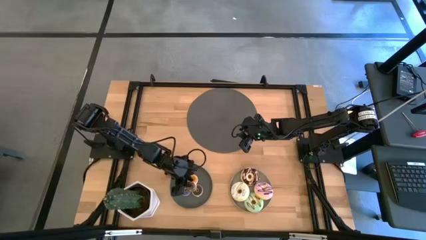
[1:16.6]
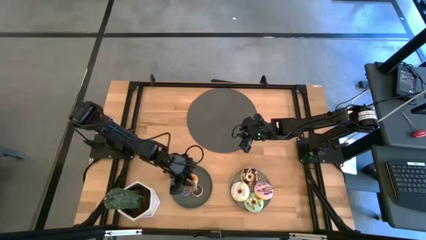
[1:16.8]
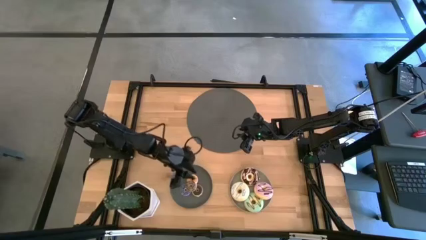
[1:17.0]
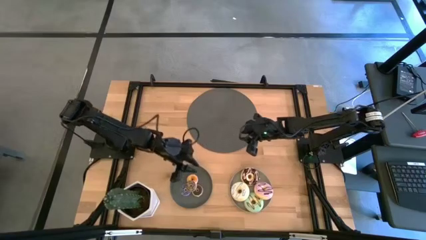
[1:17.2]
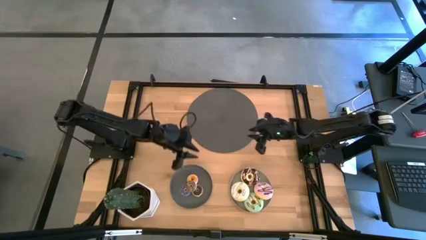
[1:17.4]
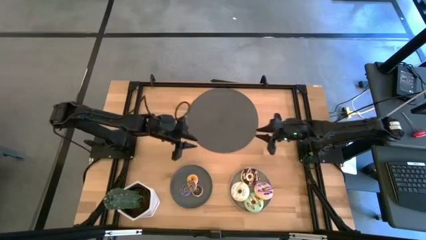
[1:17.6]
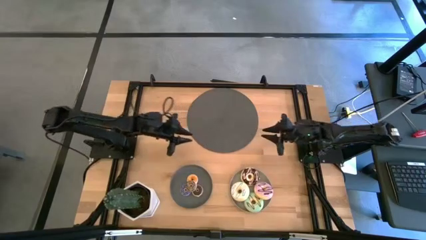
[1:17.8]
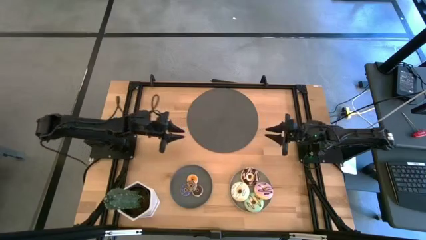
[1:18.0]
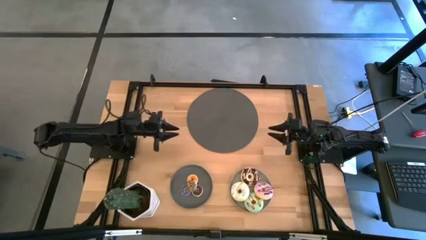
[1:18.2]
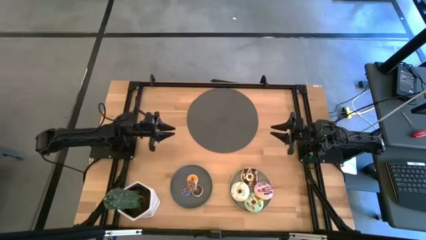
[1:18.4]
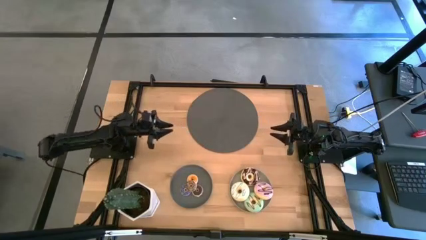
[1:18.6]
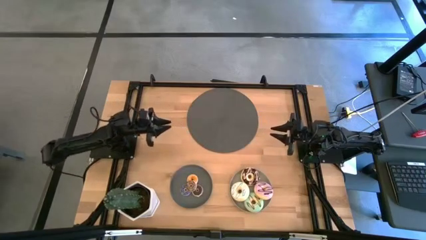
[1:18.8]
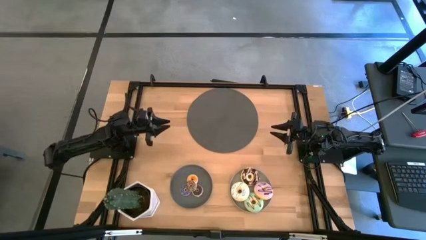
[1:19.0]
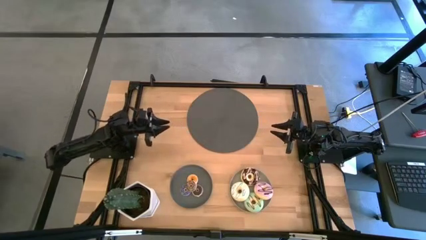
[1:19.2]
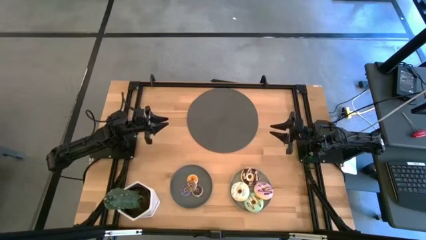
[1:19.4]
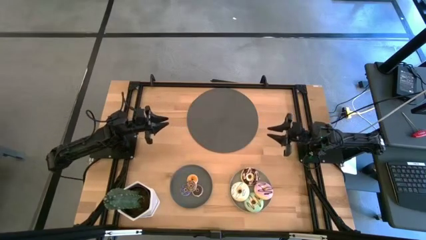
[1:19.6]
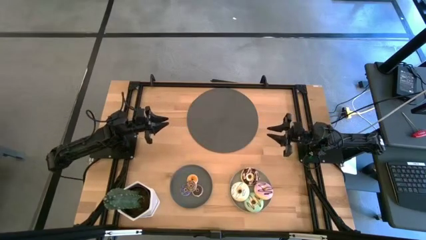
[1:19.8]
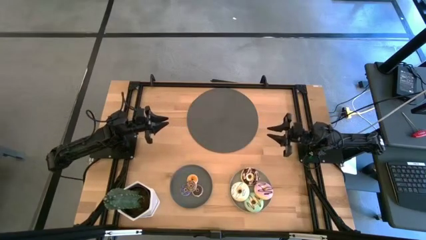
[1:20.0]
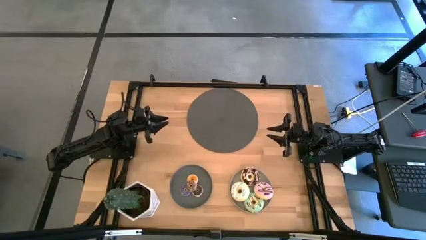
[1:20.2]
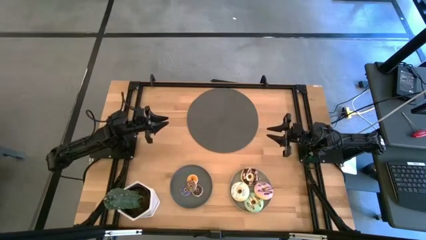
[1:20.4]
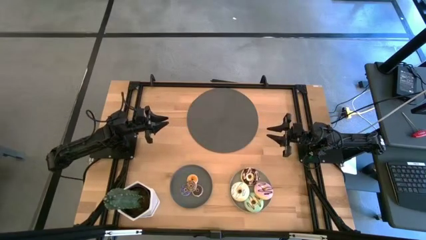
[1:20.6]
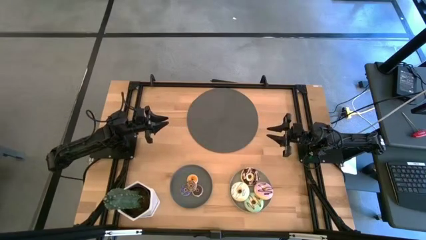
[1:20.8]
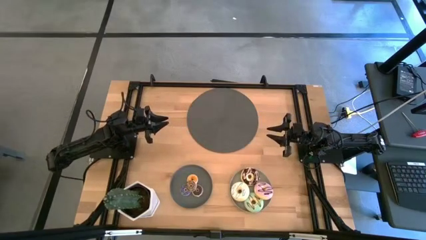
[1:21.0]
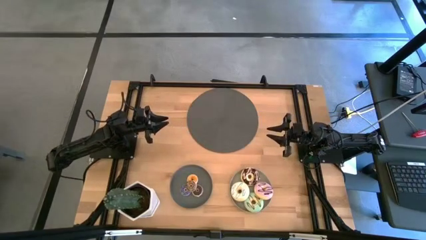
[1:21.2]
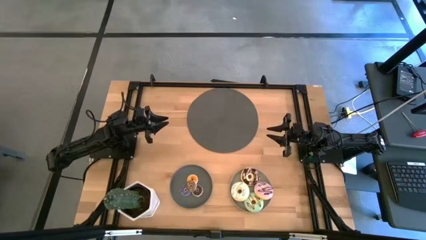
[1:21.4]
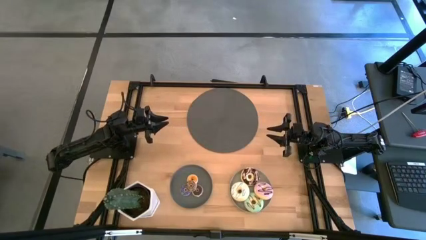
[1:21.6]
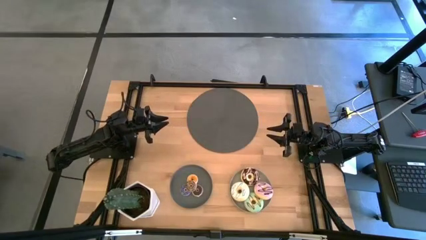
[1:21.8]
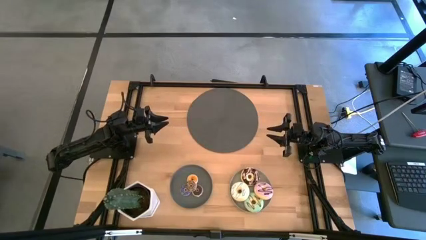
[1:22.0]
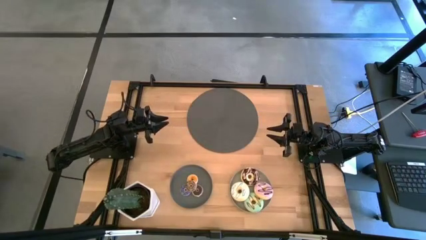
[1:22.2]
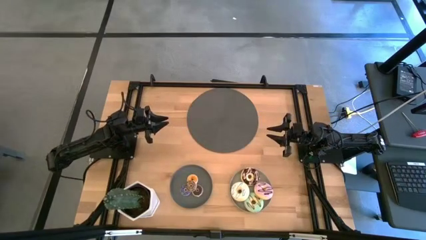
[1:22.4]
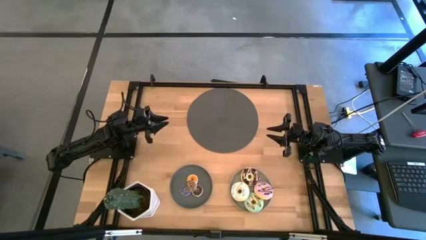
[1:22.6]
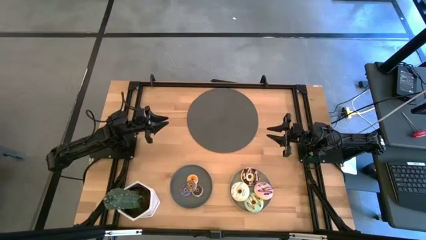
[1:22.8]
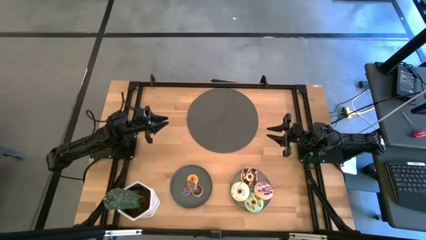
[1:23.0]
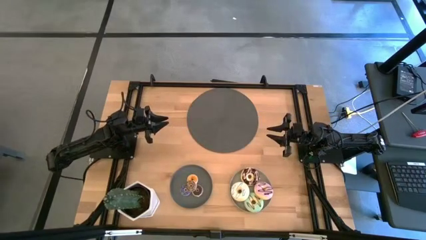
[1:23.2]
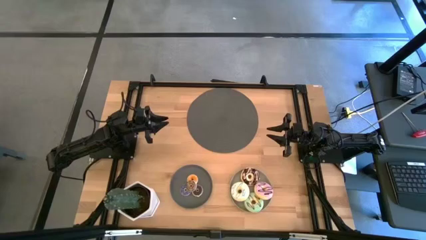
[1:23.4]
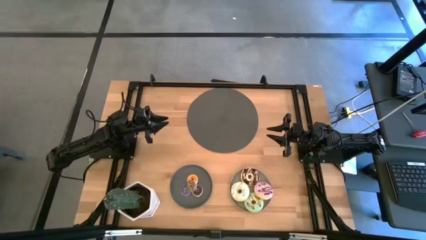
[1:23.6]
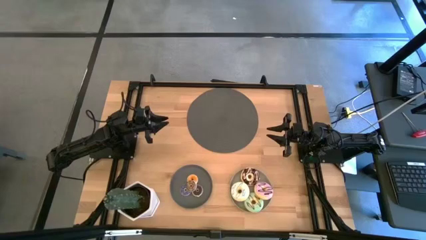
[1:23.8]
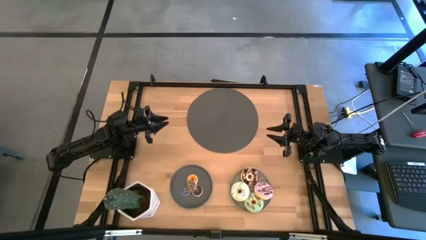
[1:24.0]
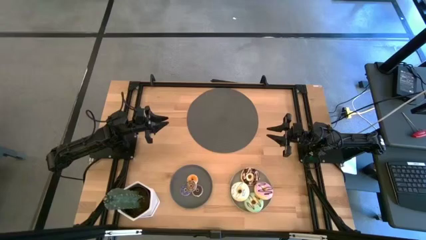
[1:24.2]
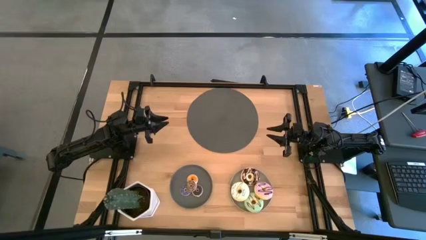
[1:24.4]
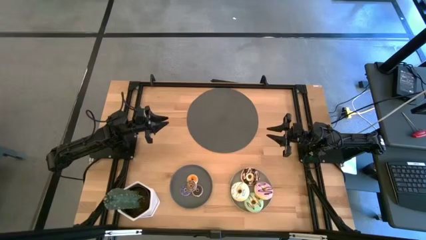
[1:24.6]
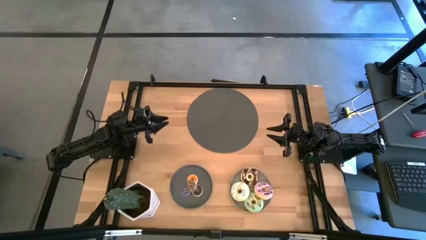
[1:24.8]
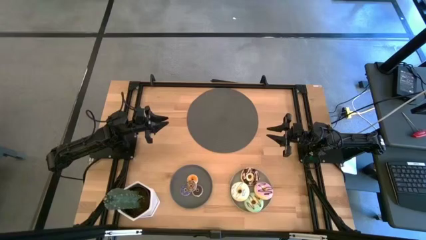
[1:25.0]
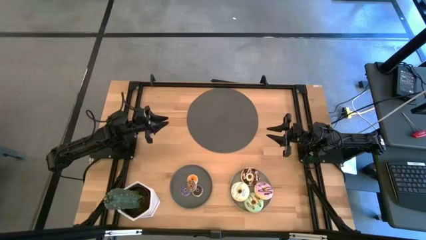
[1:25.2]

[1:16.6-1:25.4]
Task: Pick & Place donuts
Return to Home Position

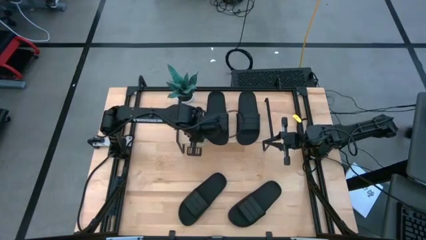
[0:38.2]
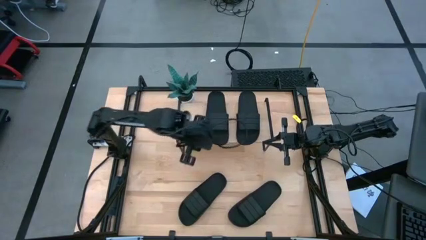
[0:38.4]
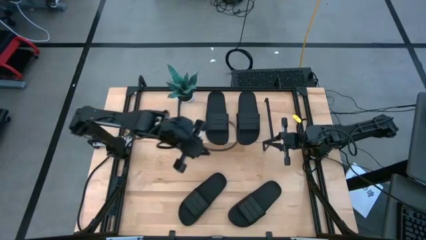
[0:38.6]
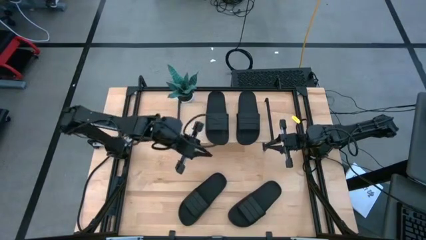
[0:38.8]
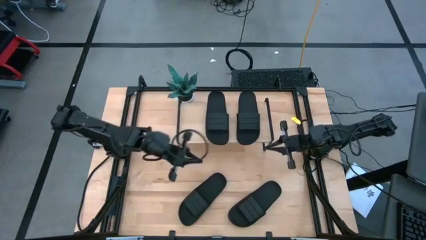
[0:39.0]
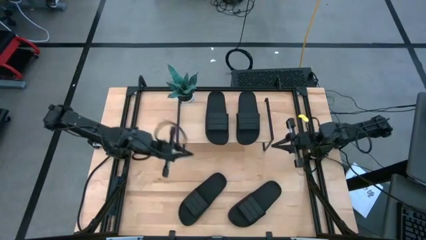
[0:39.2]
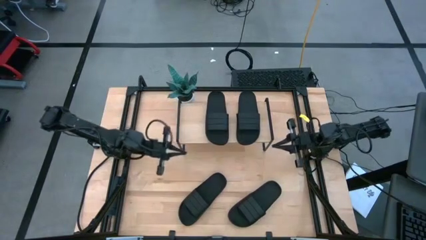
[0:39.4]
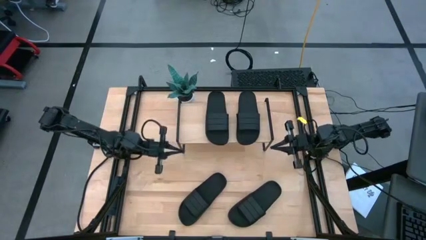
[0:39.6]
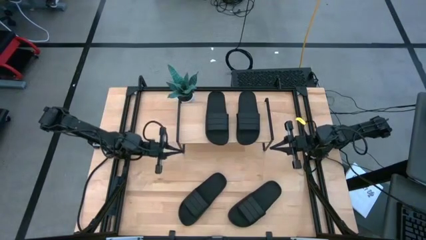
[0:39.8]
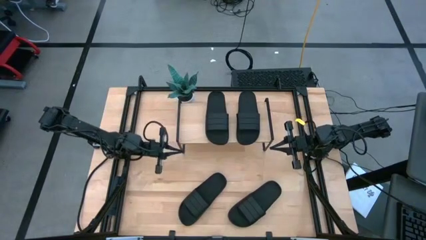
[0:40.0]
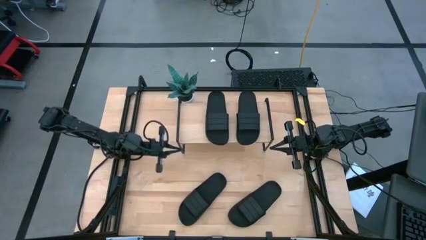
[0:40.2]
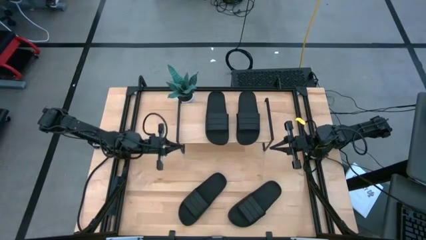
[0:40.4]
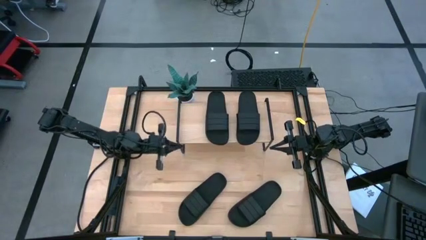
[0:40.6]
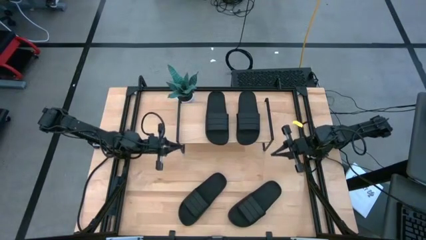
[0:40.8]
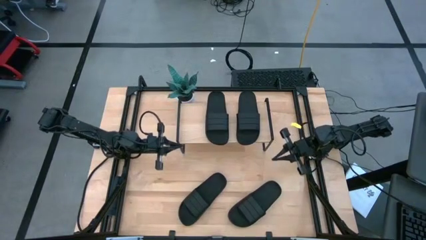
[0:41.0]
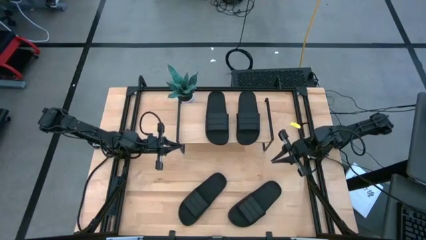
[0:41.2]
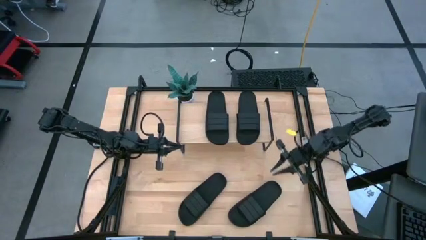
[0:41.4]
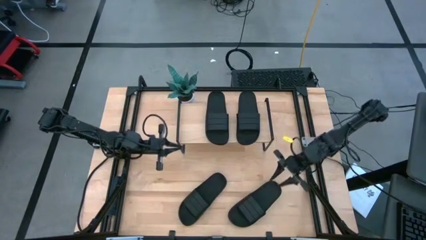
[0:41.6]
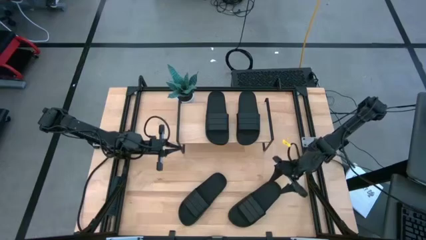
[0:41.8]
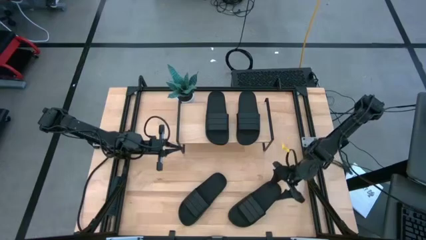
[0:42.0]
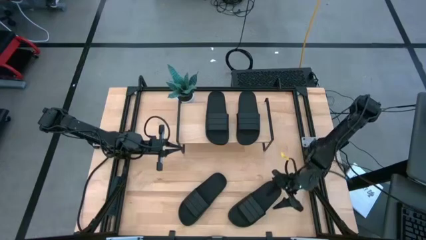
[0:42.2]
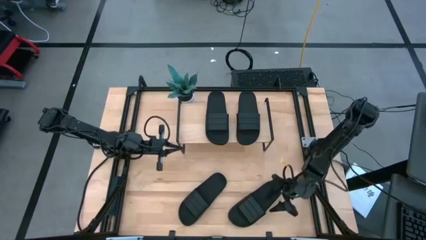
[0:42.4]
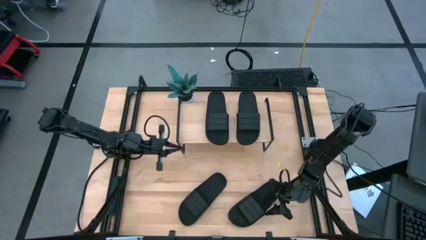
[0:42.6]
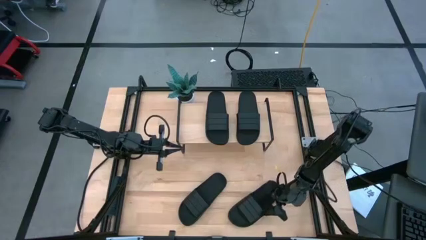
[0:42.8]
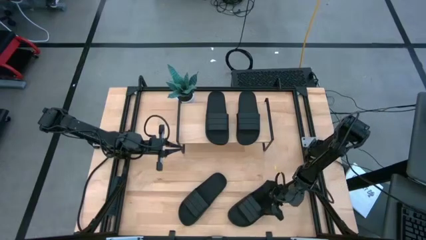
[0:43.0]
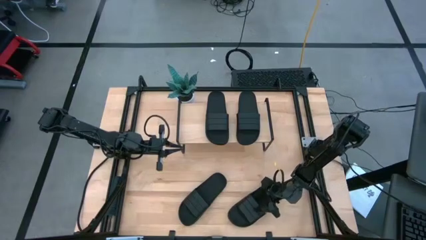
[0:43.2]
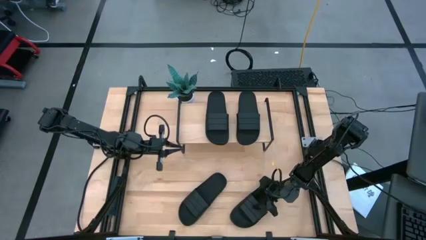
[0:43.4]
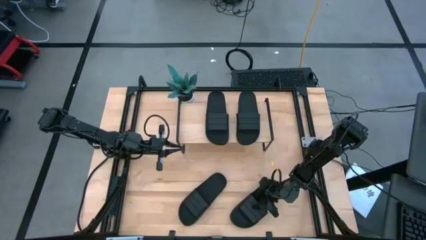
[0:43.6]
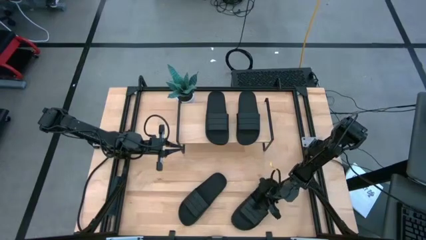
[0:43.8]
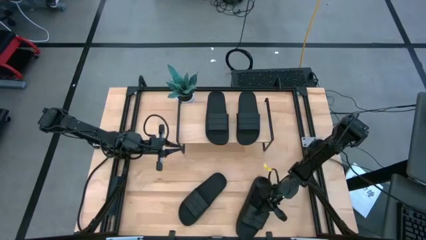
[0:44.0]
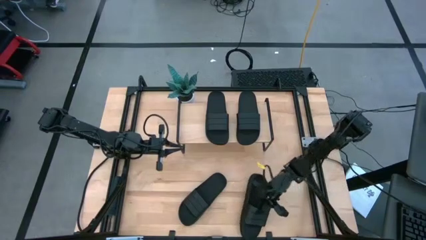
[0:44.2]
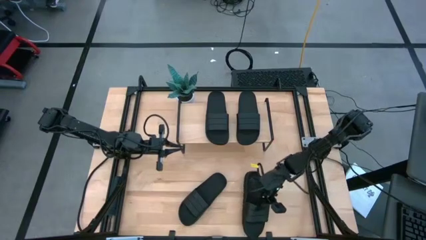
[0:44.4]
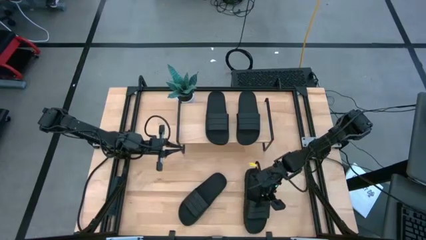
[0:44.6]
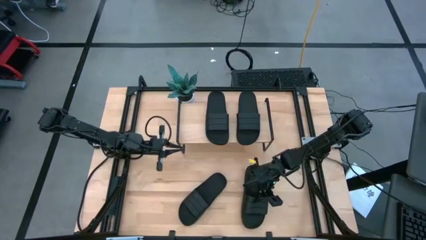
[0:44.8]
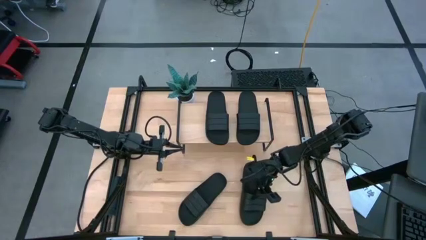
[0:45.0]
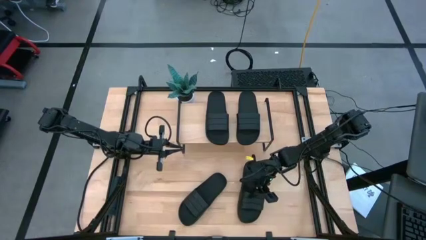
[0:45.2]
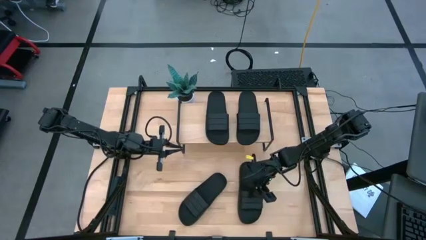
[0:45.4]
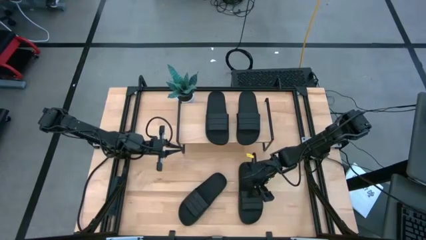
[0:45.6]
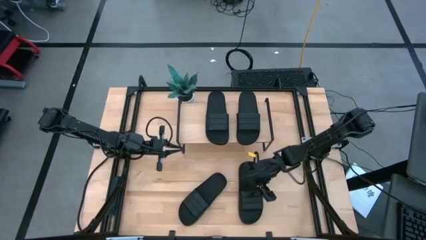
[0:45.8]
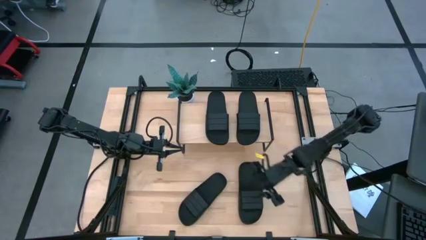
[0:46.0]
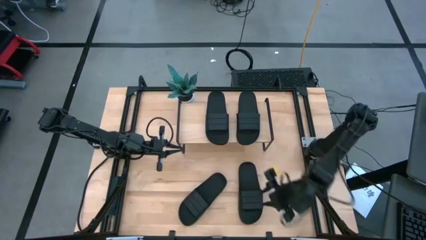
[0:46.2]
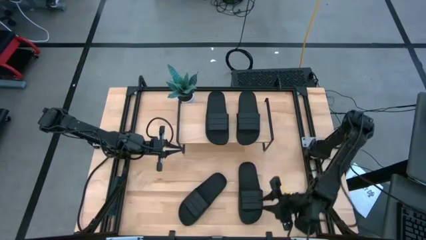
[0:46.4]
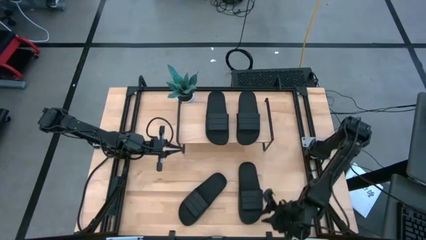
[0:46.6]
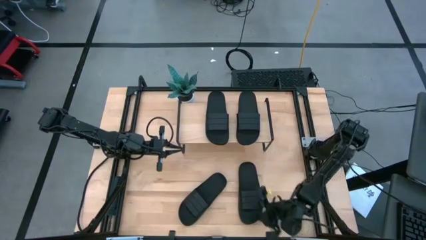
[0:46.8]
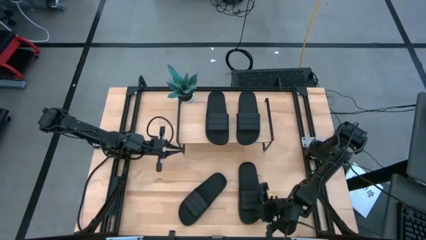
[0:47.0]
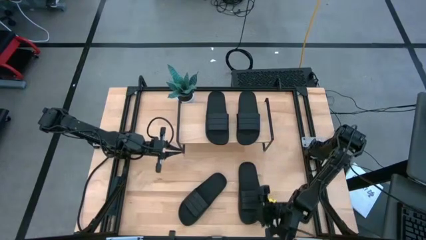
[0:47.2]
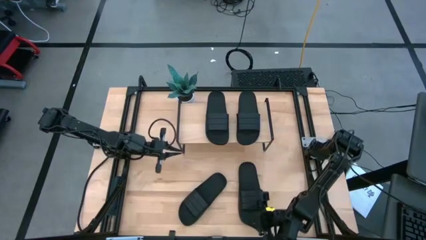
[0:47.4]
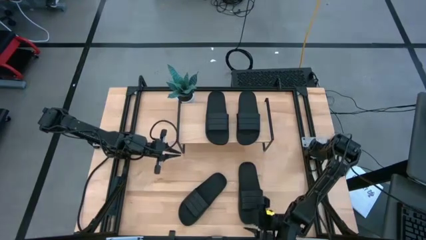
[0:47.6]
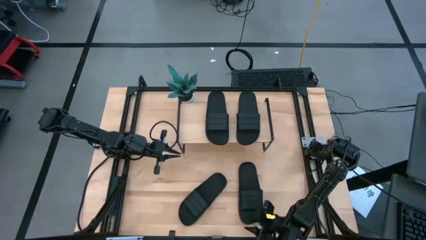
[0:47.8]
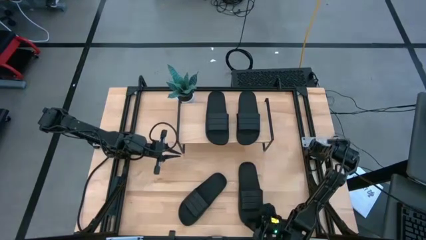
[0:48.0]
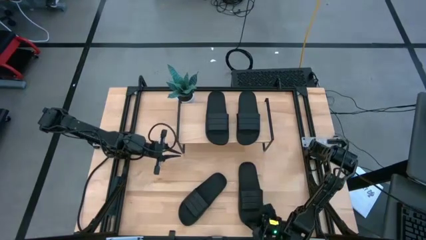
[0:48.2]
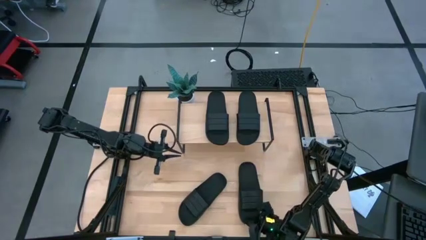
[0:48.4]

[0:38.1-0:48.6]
Task: Pick and place slides into the shelf
Put the right slide under the shelf
